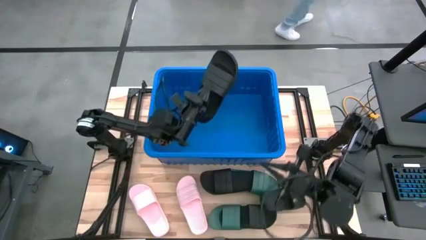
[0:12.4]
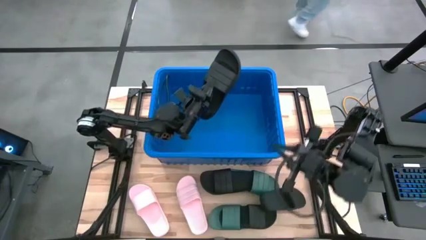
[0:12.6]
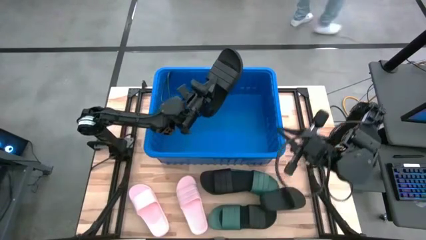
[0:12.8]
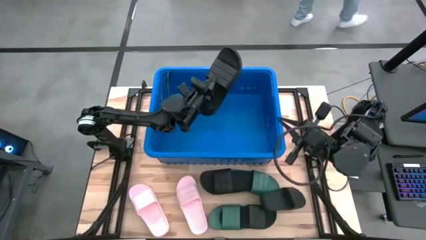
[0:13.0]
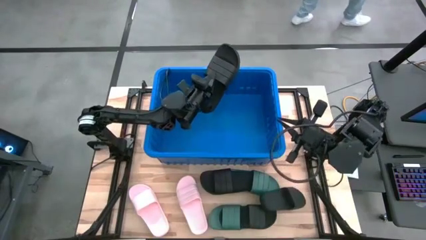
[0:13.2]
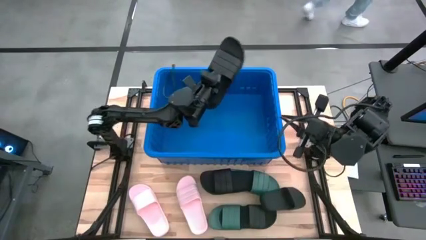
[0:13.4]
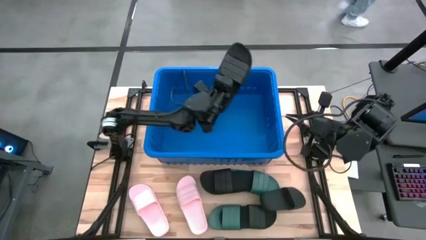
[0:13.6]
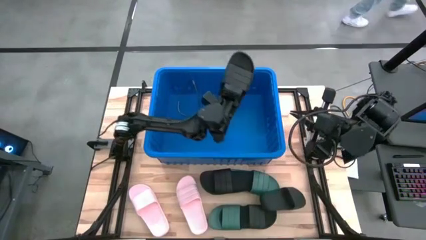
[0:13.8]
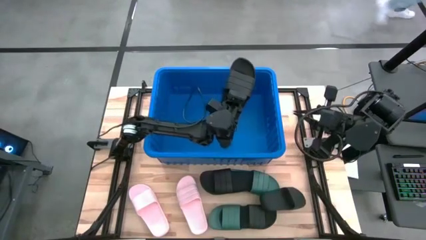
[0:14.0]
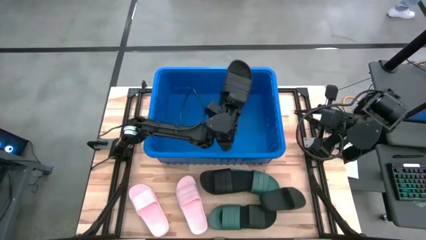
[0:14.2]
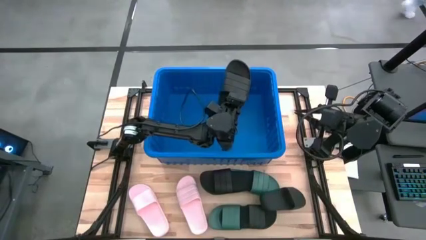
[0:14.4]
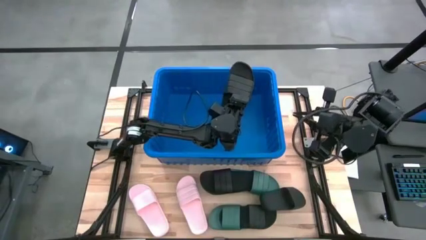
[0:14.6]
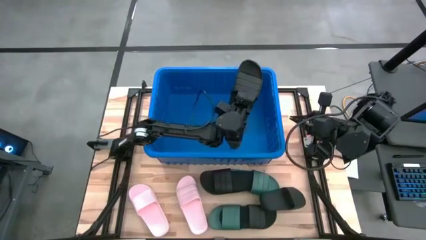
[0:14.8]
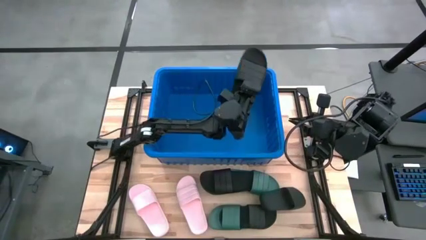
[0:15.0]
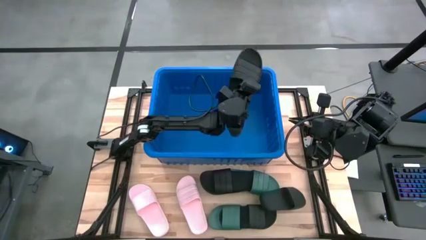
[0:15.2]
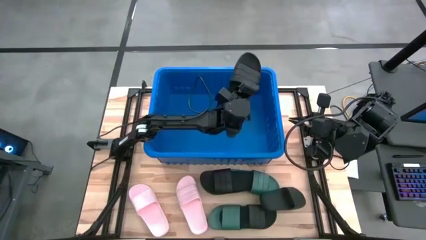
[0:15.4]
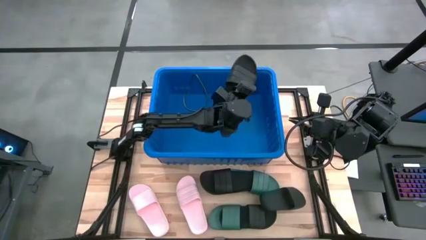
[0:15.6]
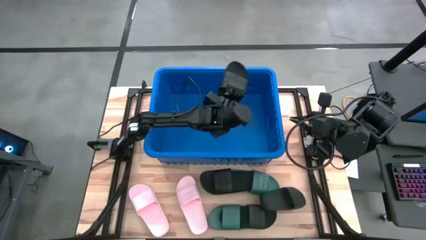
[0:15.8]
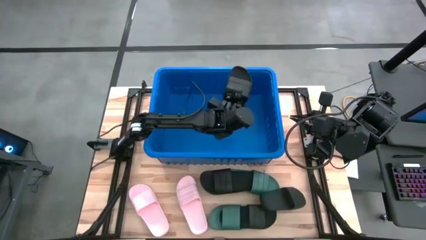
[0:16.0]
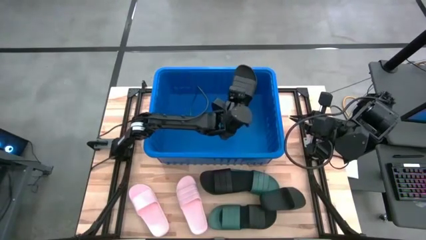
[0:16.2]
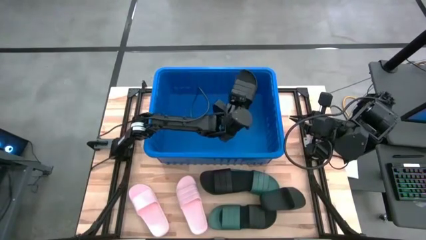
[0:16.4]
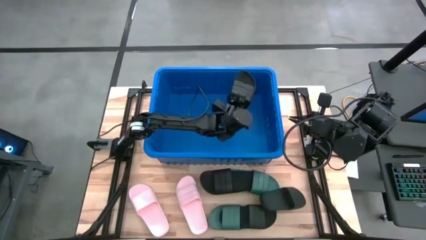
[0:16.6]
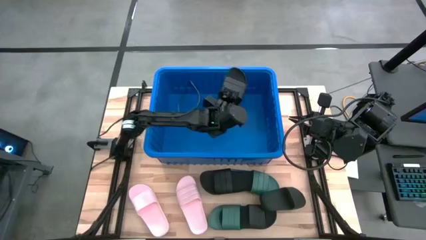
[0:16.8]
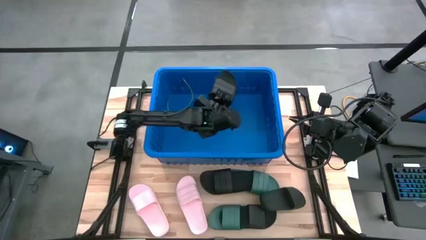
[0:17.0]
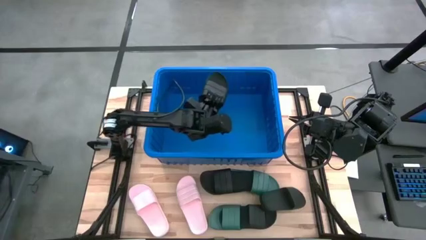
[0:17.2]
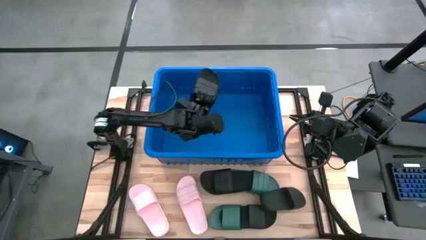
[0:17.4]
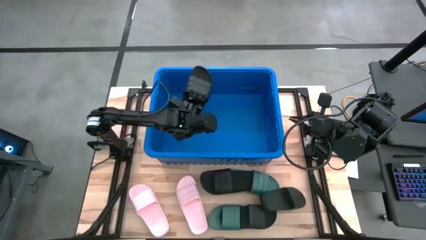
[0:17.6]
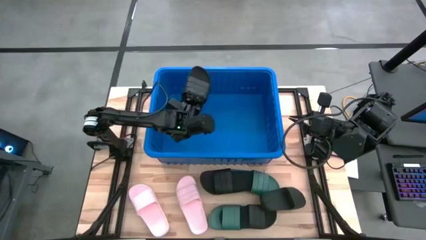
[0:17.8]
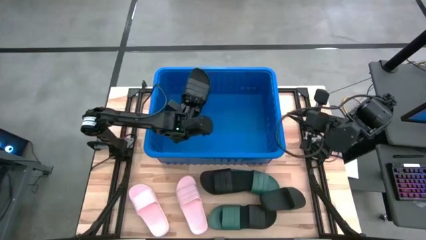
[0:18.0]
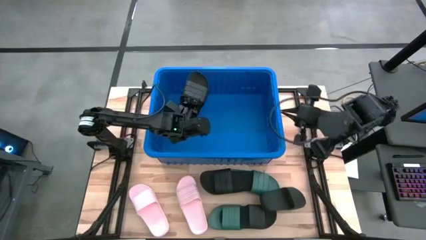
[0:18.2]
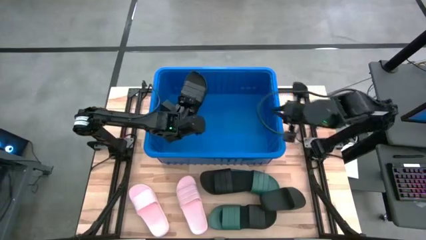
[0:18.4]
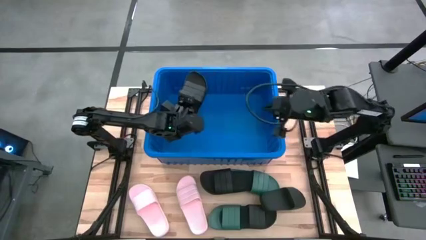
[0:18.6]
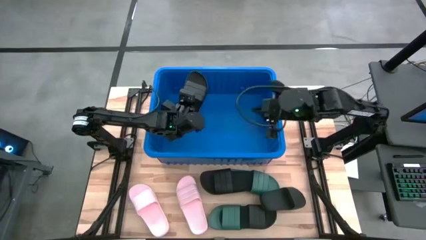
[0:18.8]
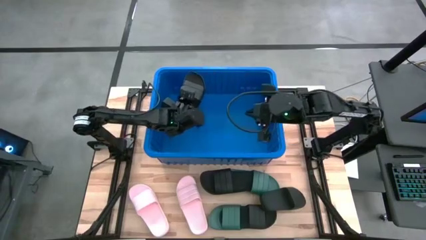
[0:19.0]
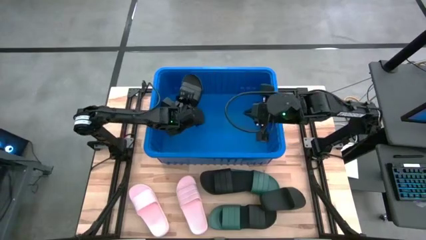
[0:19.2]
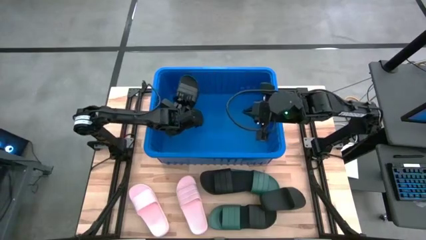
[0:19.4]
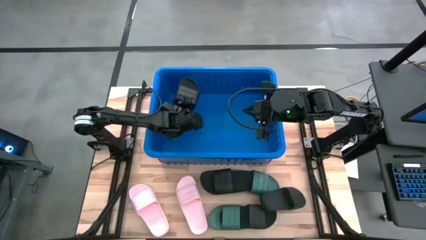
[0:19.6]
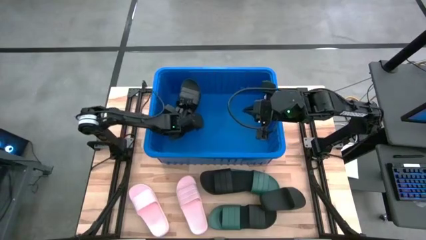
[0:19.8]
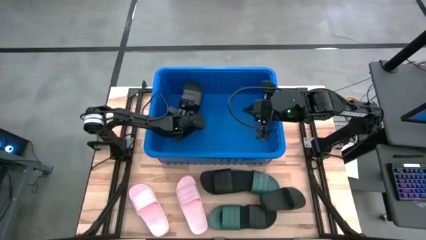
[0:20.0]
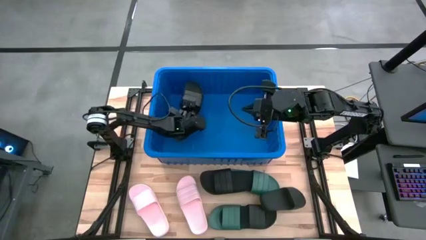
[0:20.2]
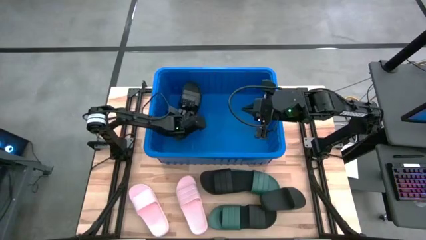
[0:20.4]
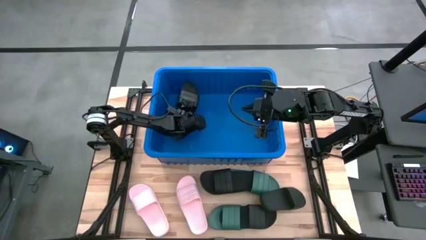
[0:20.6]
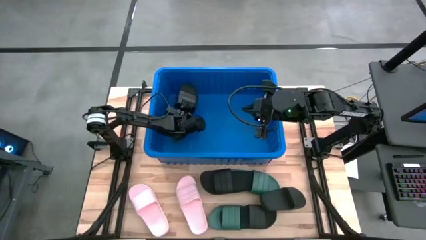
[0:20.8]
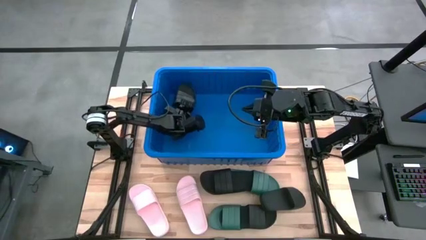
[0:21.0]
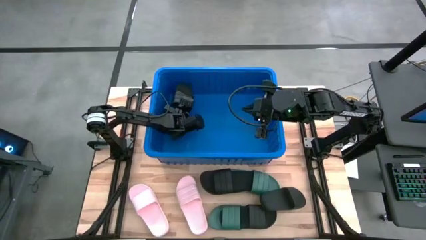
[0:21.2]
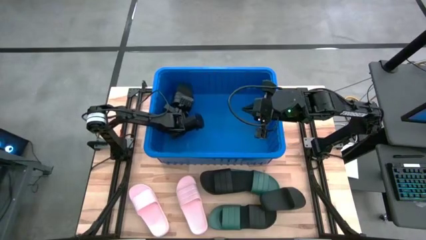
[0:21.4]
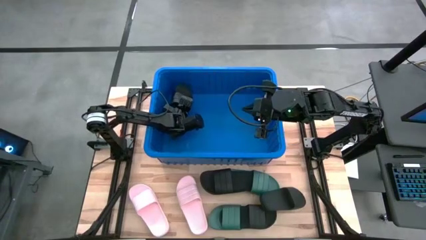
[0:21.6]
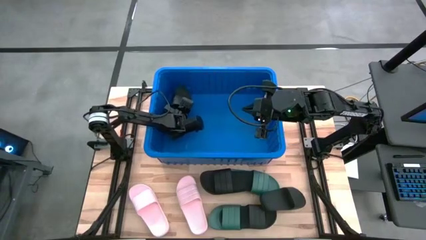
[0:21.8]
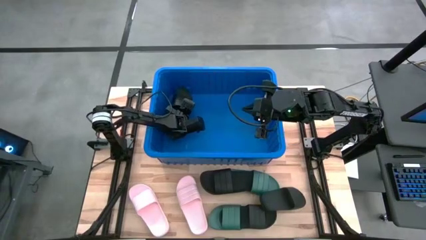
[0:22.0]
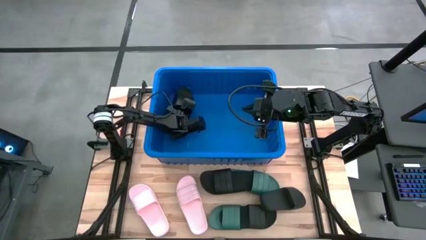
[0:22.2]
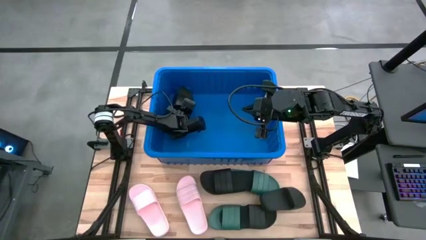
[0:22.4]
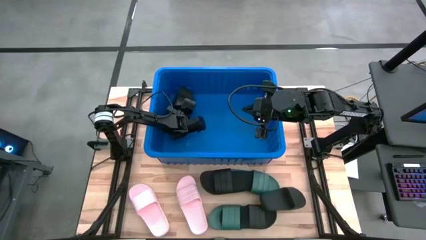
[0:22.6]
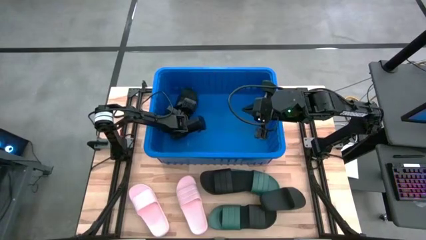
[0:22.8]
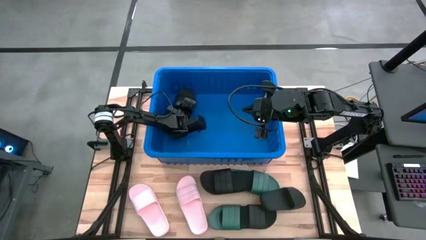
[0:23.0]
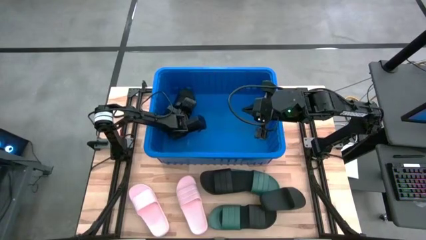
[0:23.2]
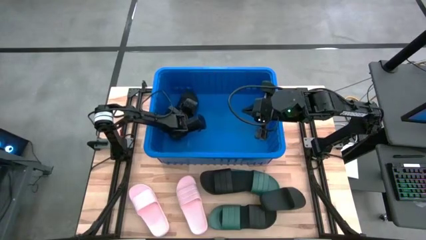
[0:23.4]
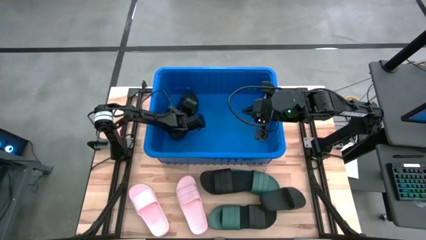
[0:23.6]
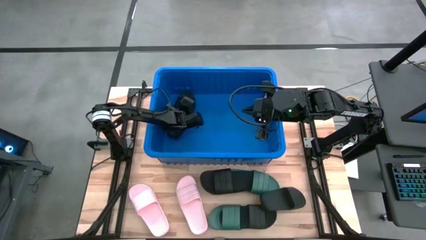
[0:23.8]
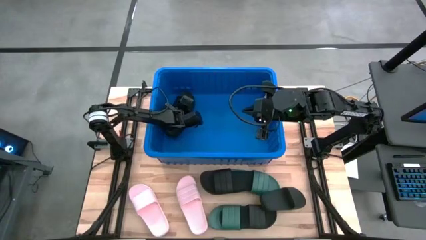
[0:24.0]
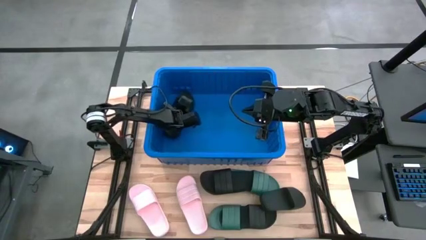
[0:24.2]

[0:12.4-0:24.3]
Task: Pick and place slides into bin
Put the black slipper into the blue bin

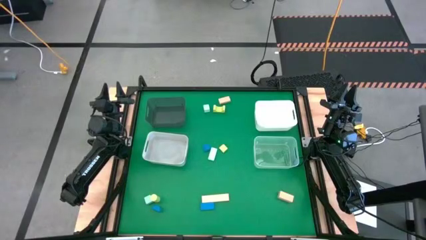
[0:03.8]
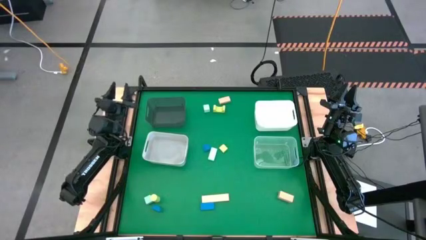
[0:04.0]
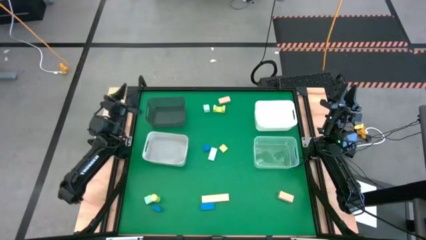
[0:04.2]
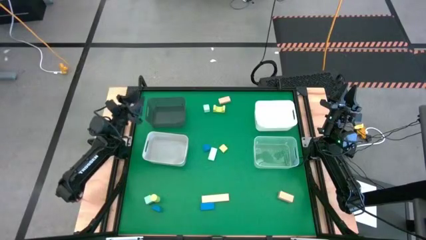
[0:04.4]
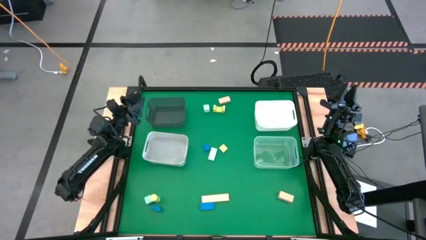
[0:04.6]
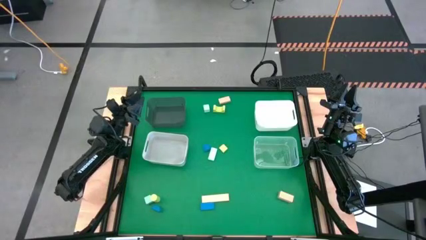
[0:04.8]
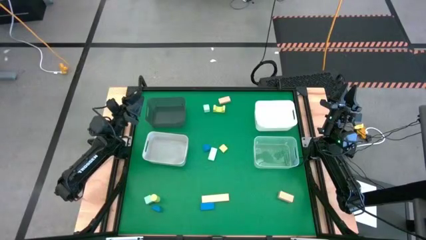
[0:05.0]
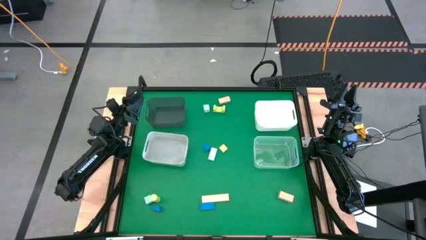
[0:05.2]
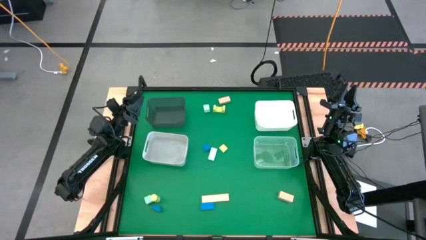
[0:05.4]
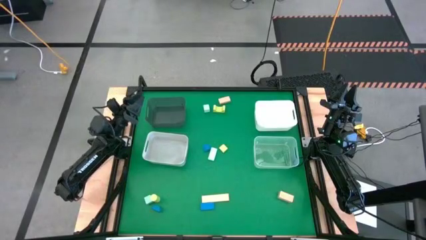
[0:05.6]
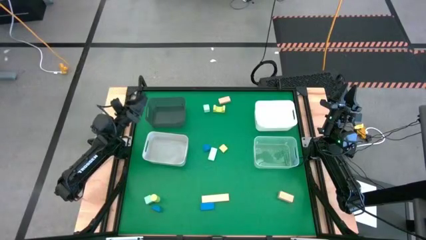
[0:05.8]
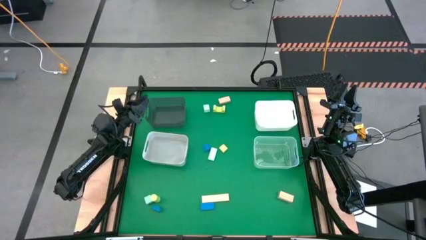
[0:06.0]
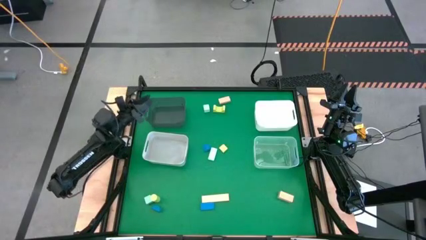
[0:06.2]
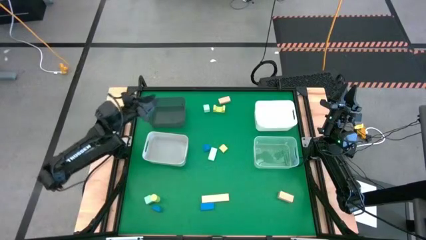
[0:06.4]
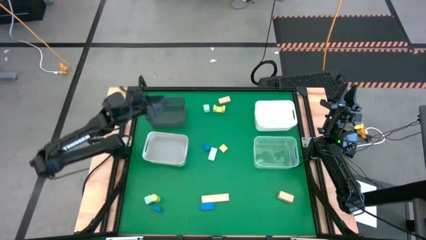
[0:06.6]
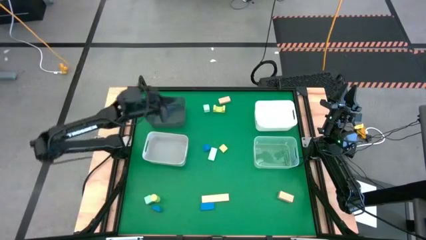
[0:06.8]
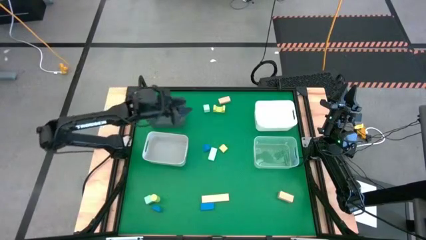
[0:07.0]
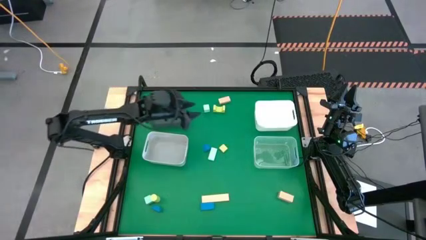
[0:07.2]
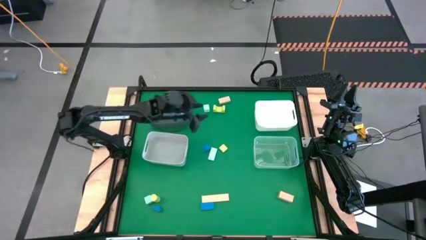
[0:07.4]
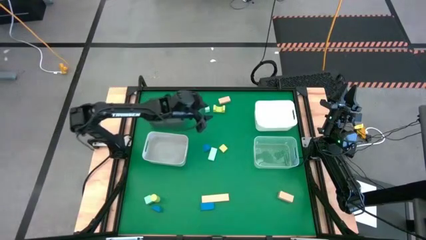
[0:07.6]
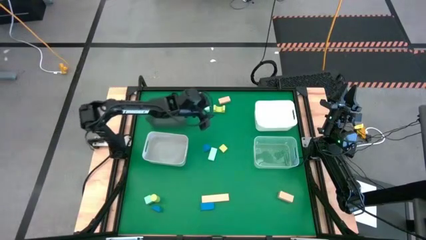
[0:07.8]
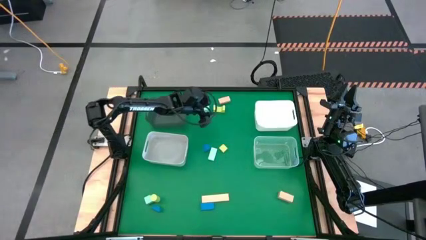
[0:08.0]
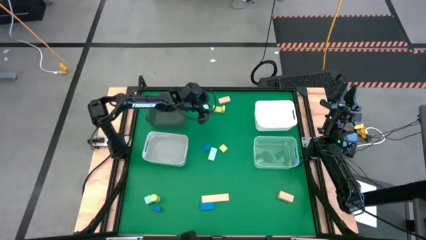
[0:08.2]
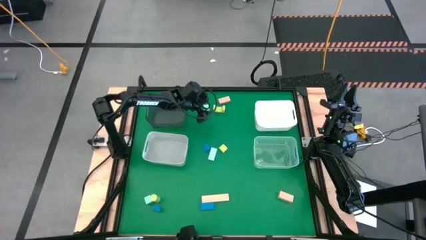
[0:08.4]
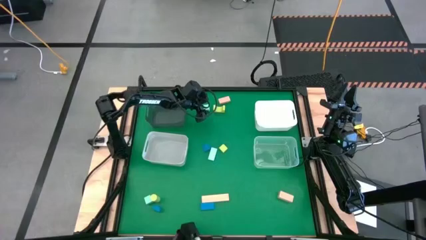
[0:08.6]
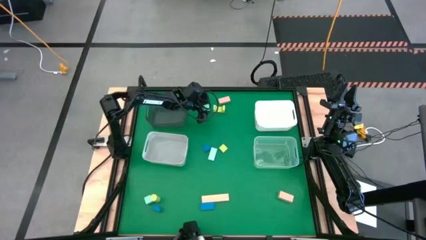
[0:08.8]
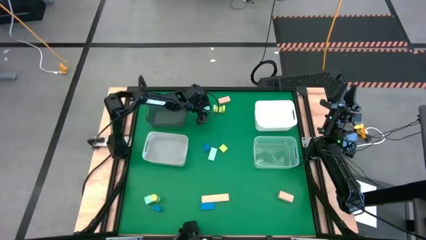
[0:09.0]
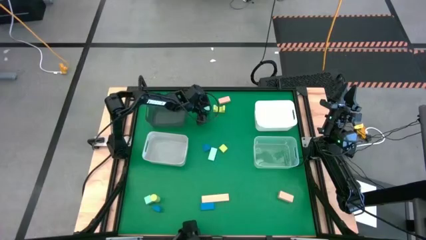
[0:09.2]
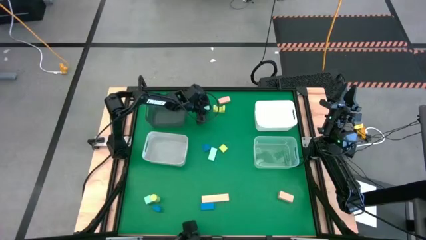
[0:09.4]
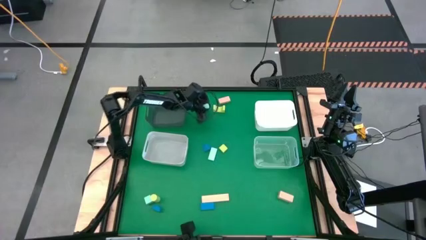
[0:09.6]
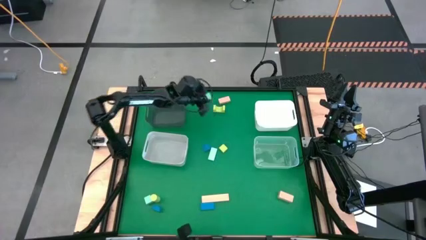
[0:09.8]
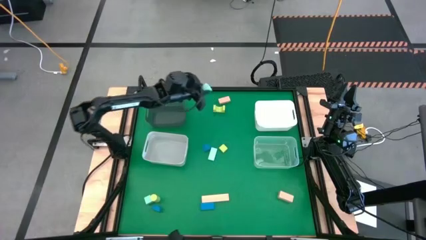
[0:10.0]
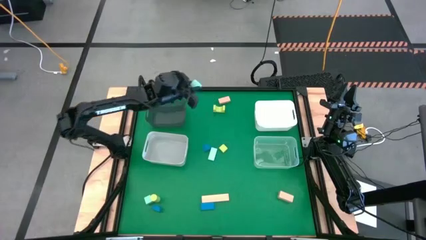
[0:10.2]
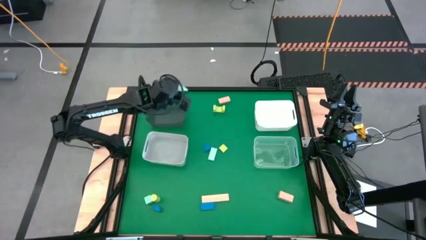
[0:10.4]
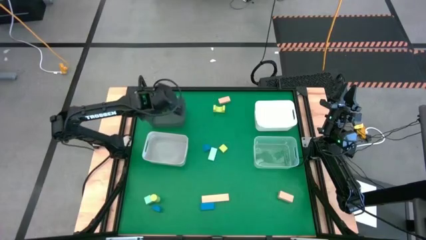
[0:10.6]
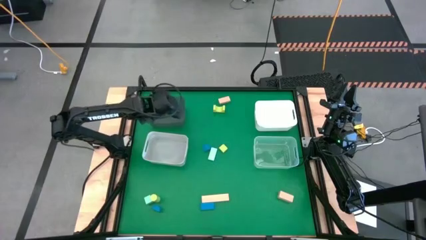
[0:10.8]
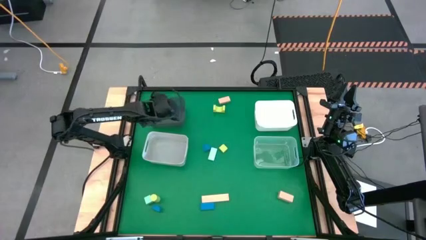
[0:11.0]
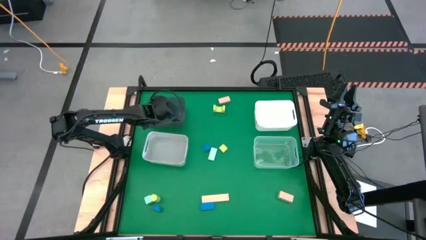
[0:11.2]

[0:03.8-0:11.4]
Task: Sort & place blocks by color
Put the top light blue block into the black bin
